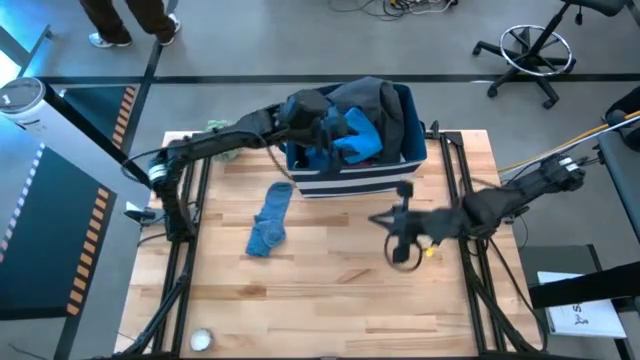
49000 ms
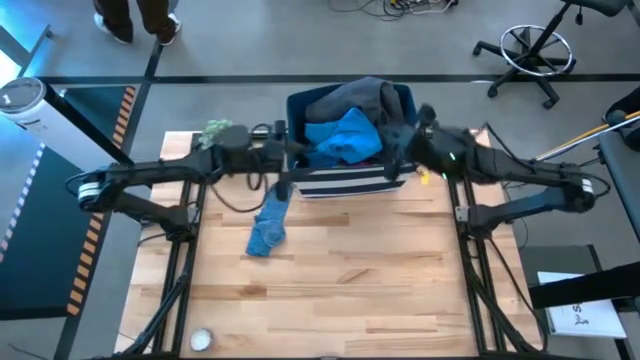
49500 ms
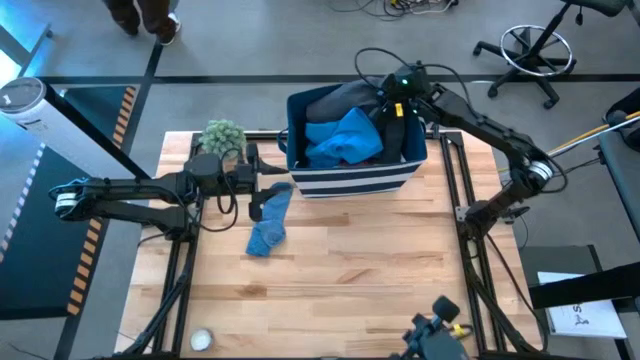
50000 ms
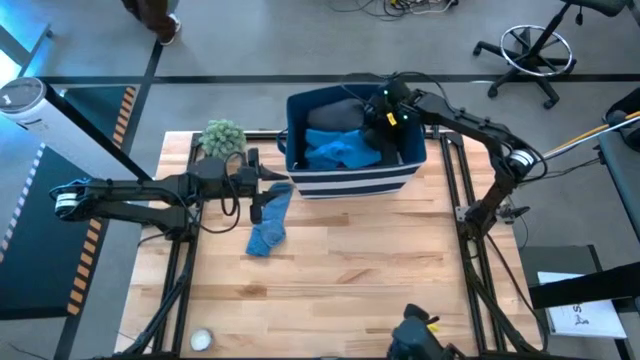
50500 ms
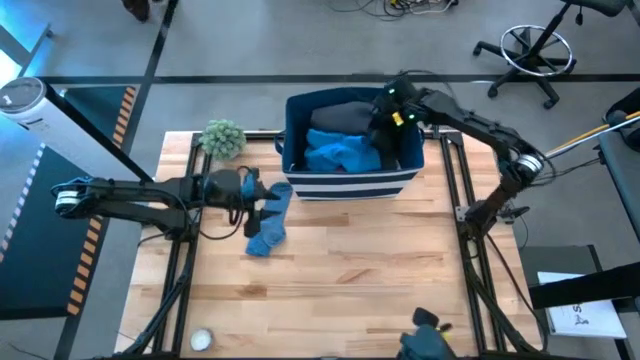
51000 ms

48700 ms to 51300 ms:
Task: Sort clothes
Adjust the blue pants in the blue laundry bin

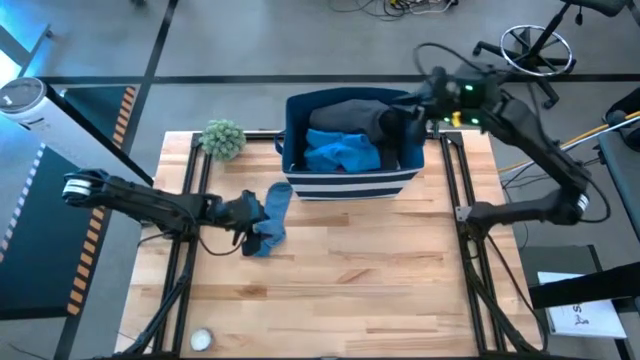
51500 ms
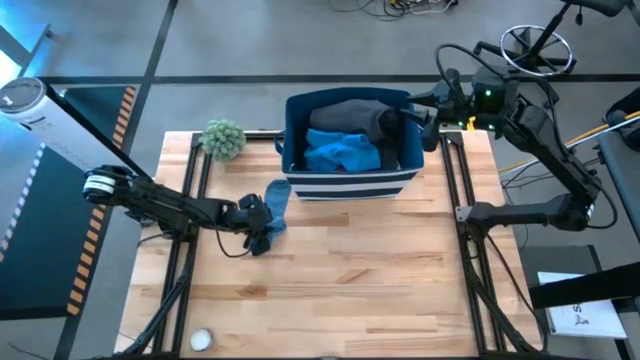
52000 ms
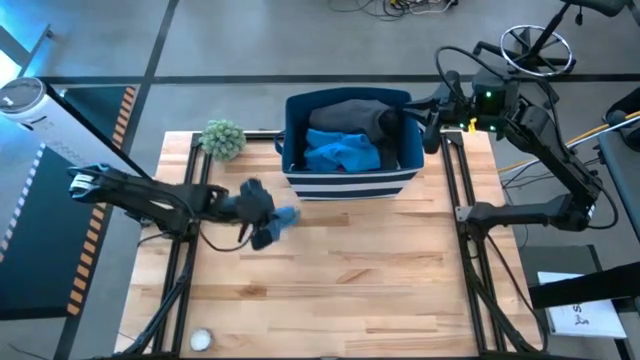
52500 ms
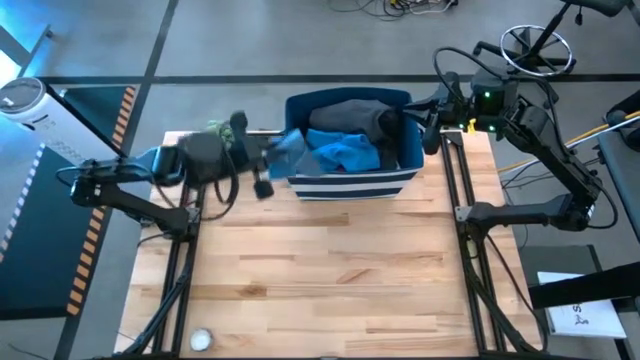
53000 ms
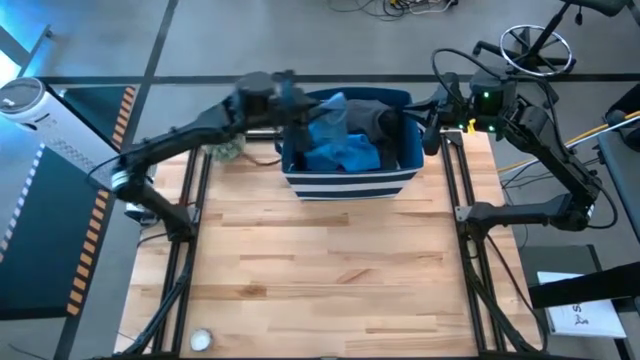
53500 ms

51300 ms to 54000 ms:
Put the blue pair of socks into the blue laundry bin

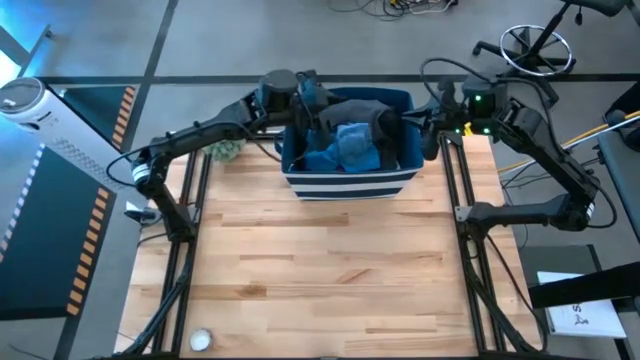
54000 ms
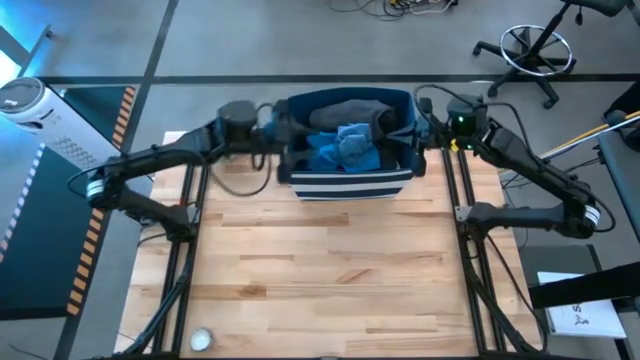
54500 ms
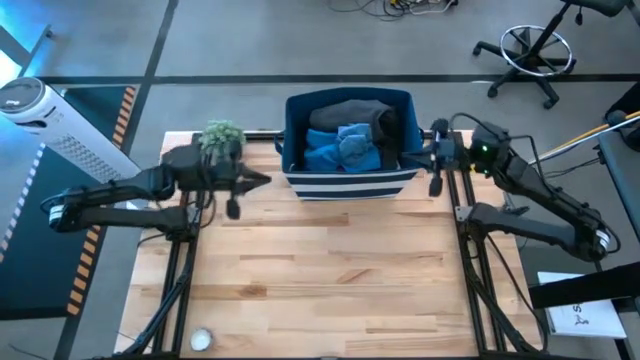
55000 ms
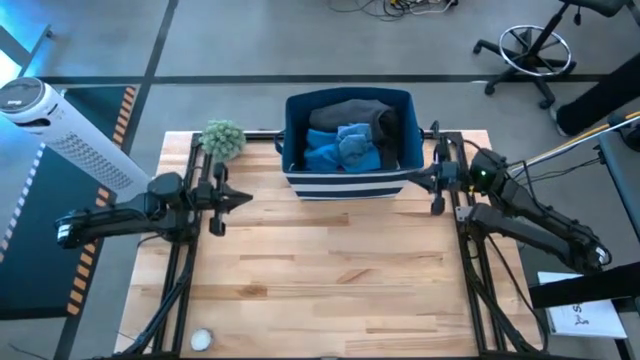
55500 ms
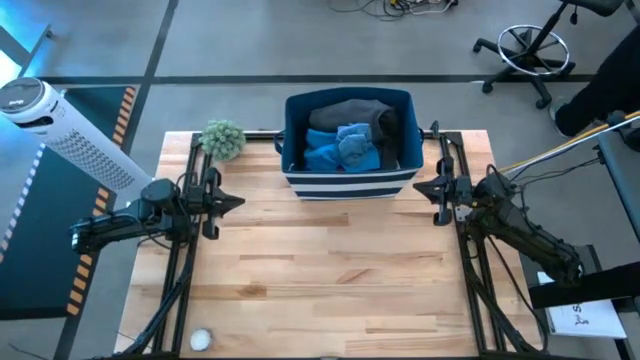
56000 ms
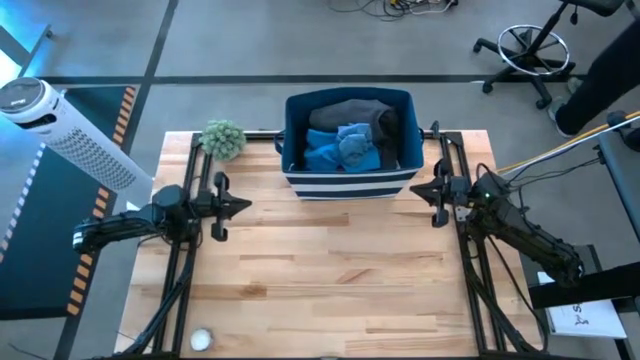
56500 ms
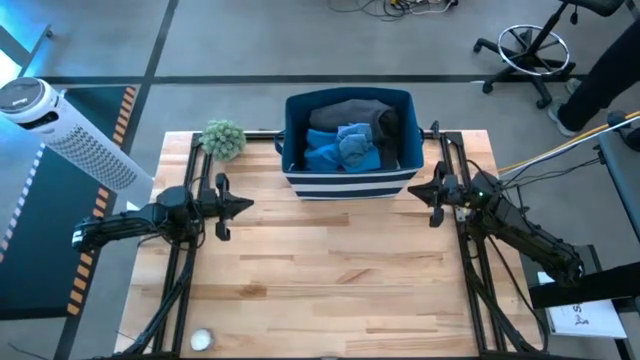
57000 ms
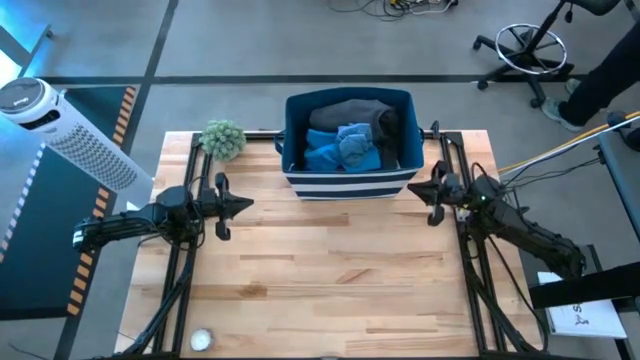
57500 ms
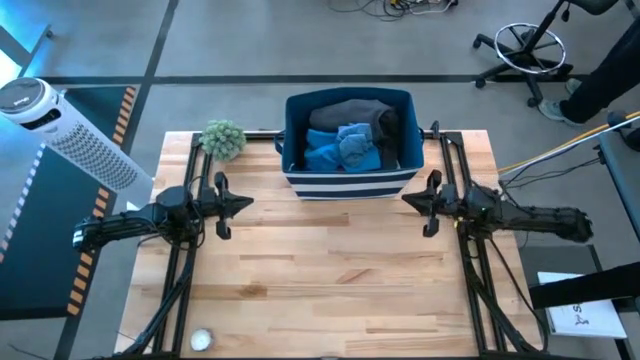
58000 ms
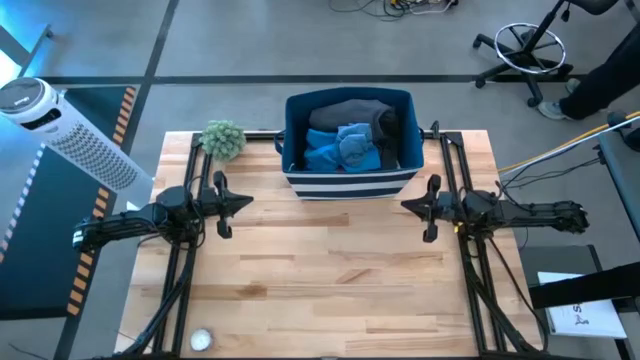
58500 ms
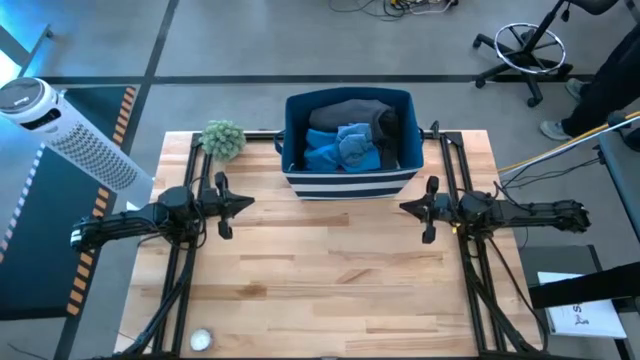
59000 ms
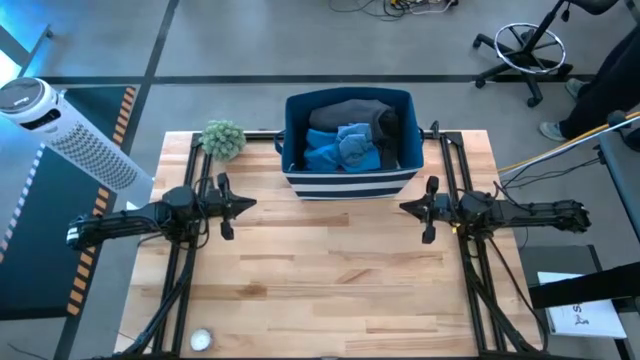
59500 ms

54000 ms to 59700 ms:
Return to Home Position

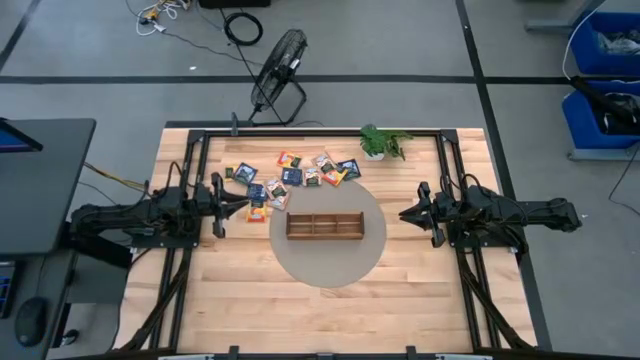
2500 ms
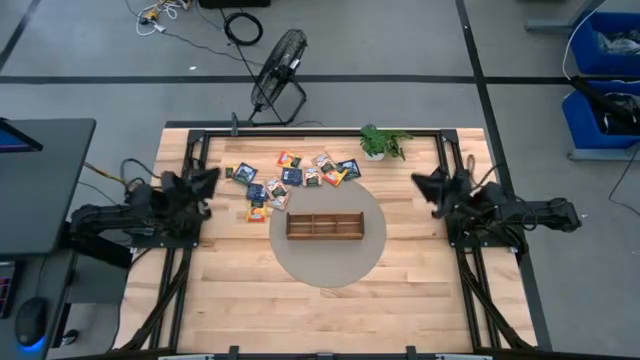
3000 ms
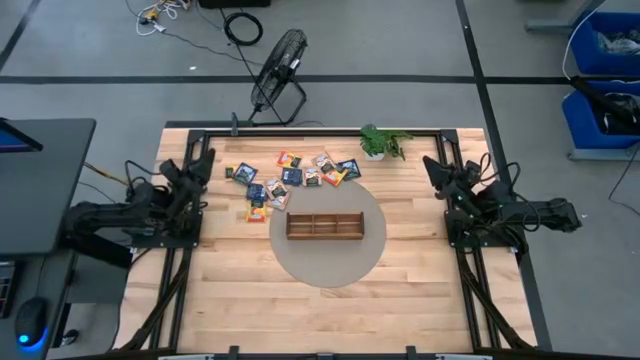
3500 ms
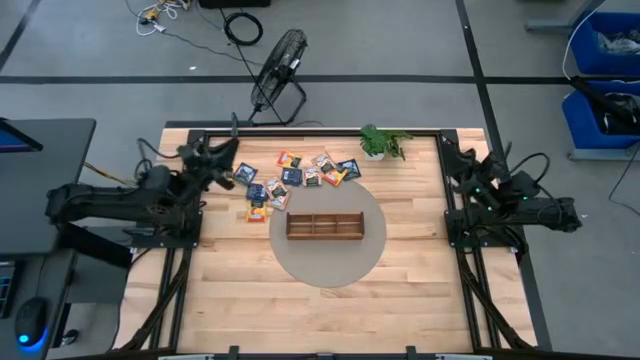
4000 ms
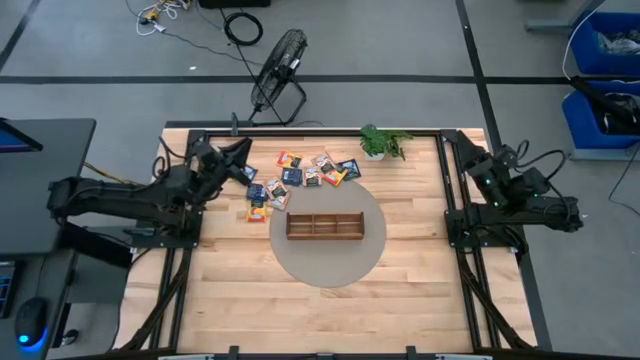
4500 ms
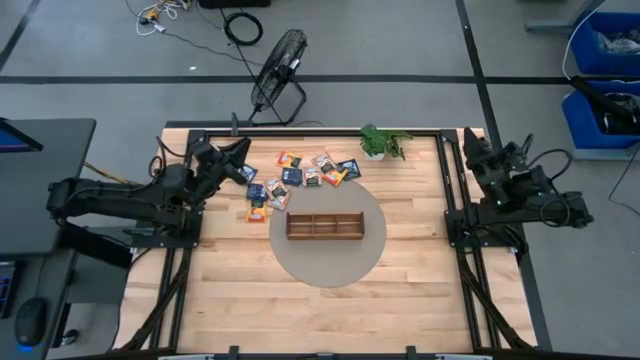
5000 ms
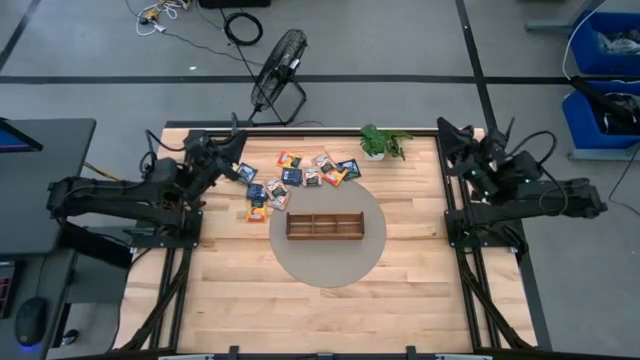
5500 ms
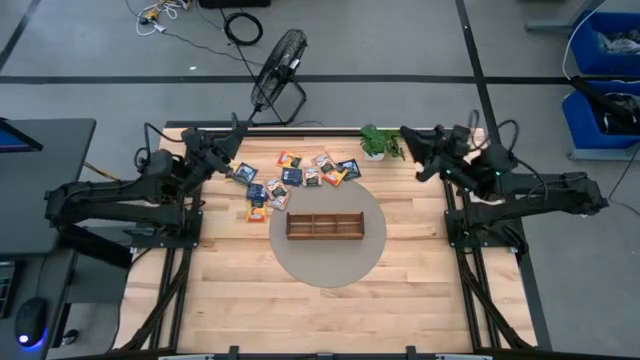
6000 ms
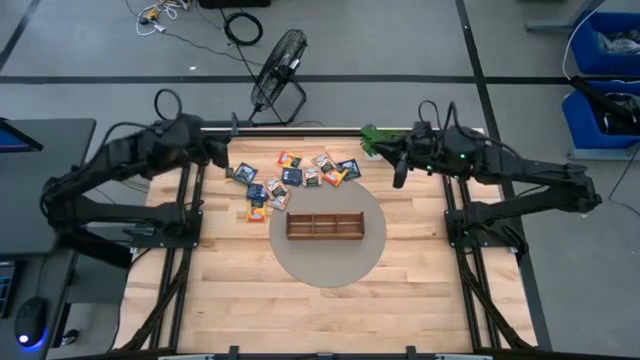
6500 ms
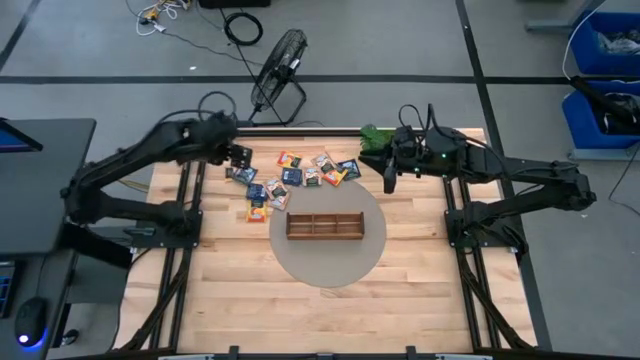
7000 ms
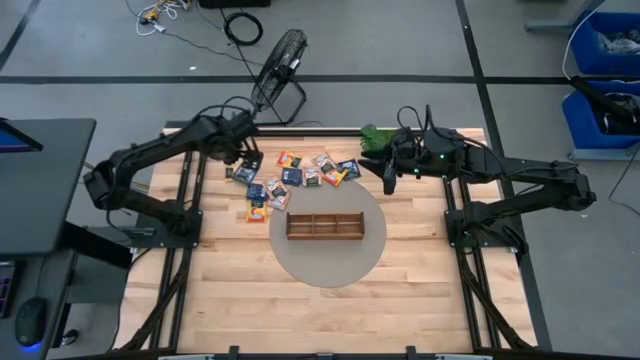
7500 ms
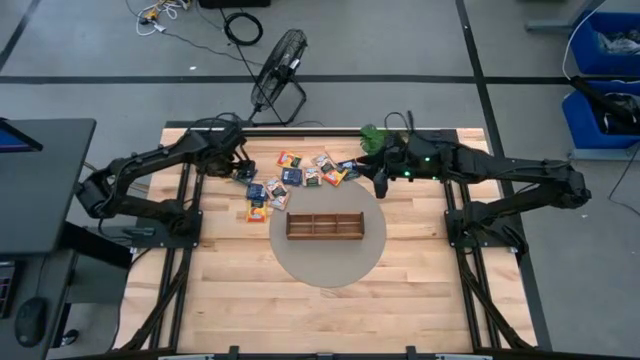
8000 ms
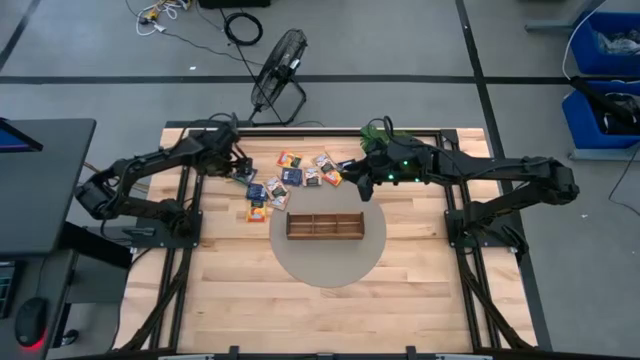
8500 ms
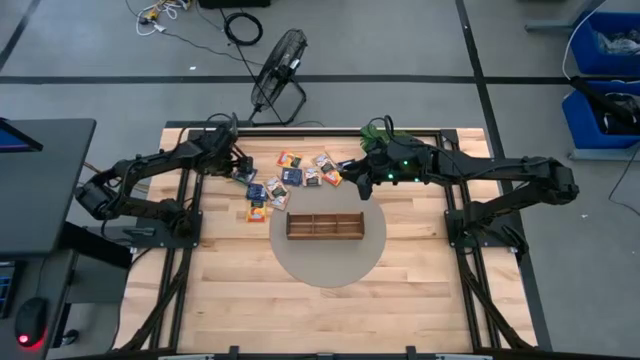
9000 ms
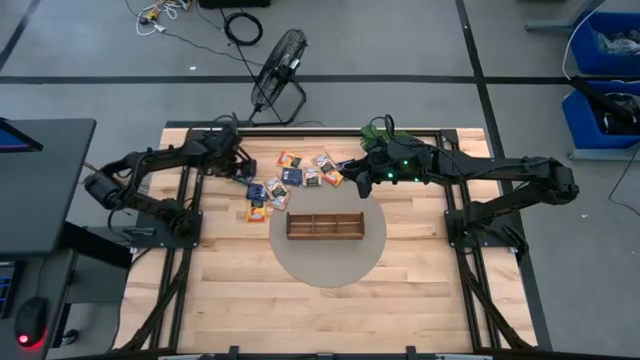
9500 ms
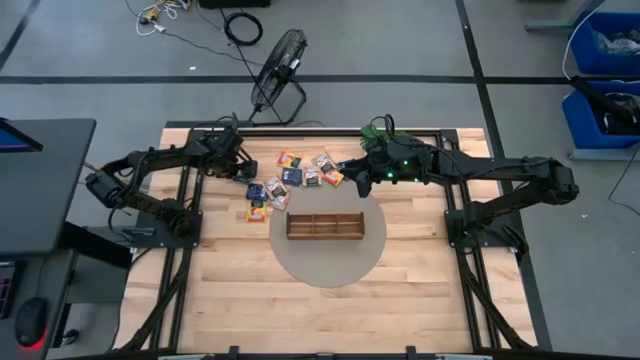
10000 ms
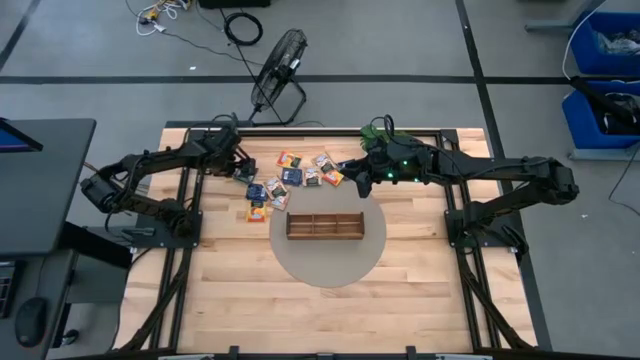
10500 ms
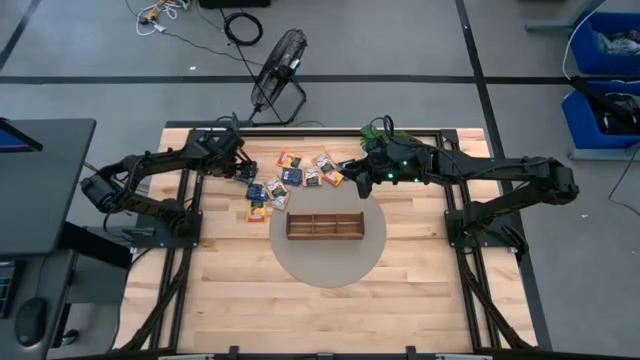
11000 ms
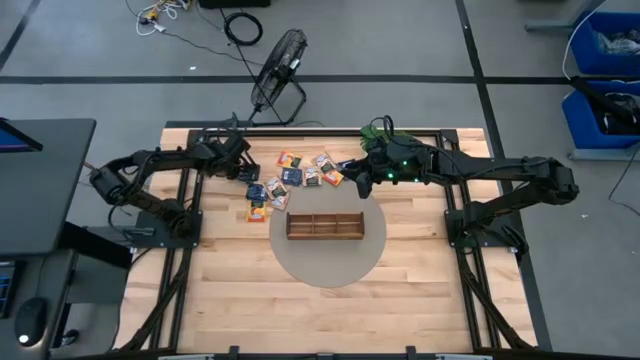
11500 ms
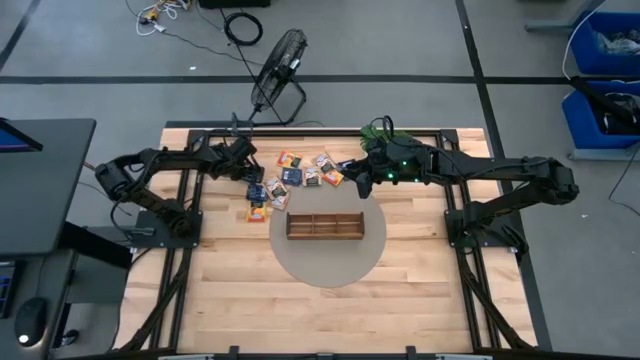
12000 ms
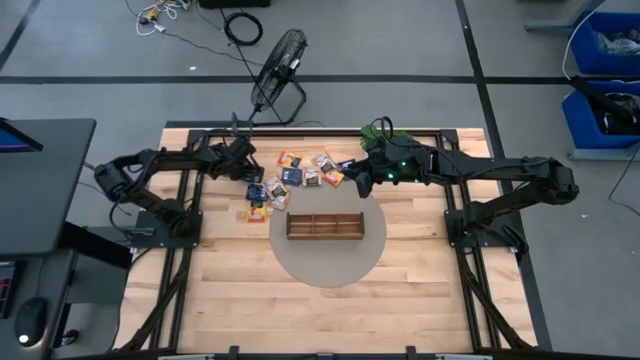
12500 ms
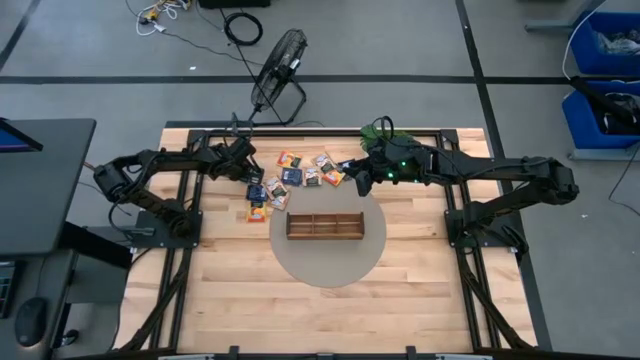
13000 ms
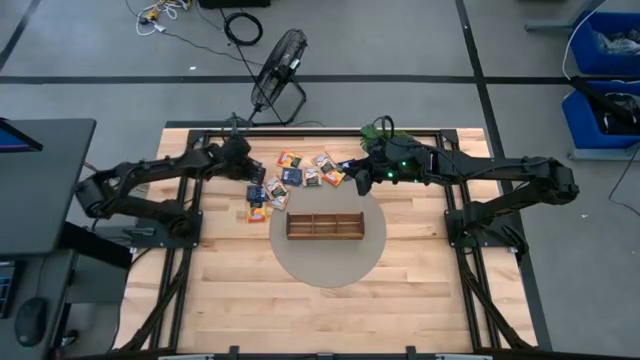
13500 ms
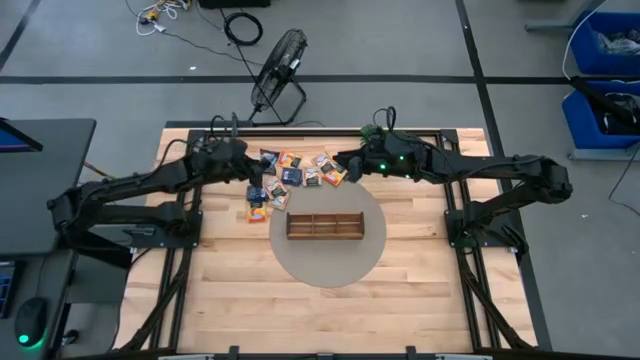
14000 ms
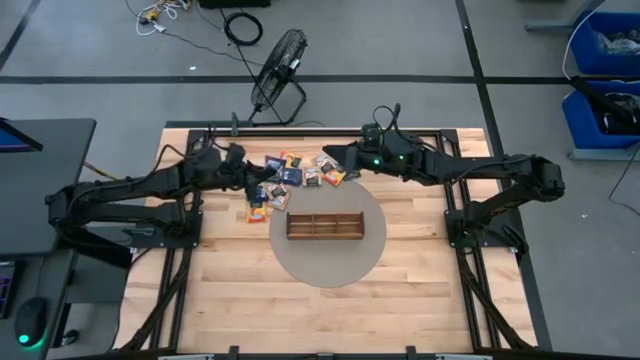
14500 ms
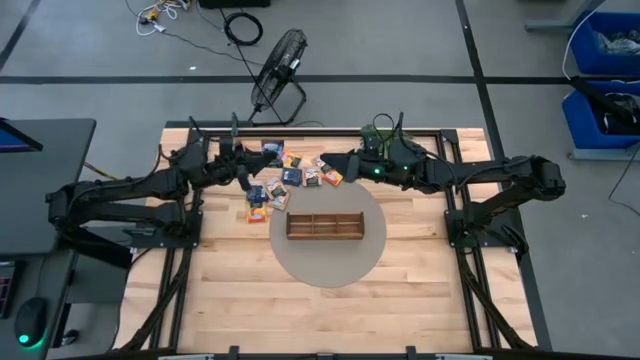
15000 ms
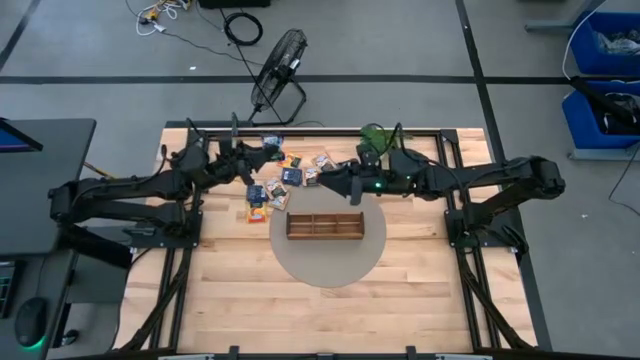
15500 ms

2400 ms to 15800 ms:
Task: Pick & Place Tea
Put the blue tea bag into the right section of the wooden organizer
